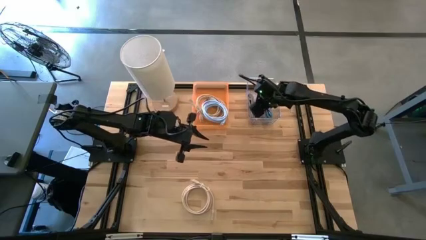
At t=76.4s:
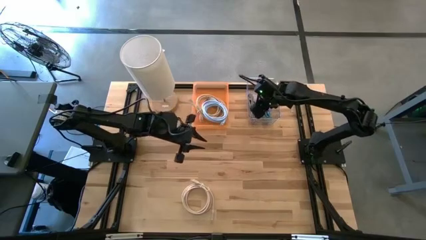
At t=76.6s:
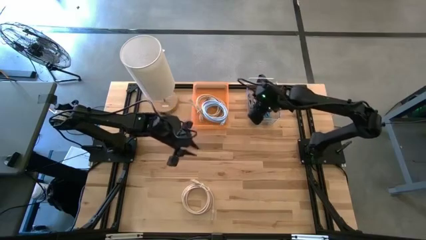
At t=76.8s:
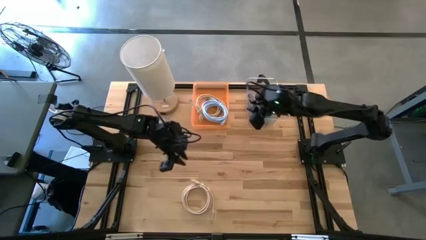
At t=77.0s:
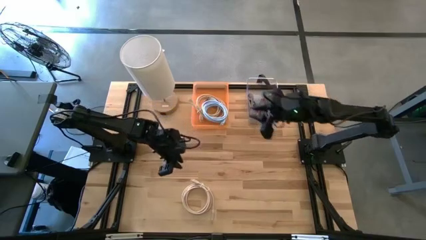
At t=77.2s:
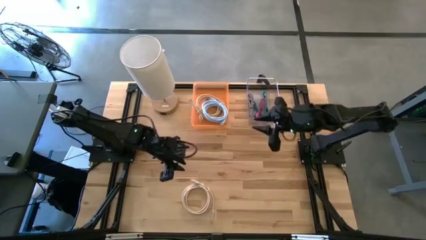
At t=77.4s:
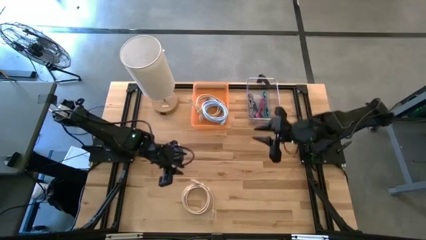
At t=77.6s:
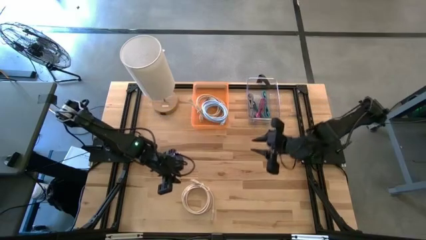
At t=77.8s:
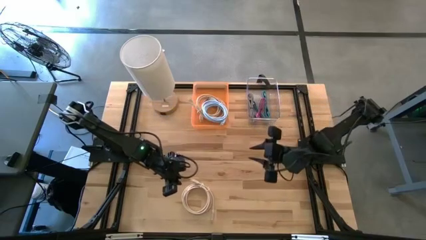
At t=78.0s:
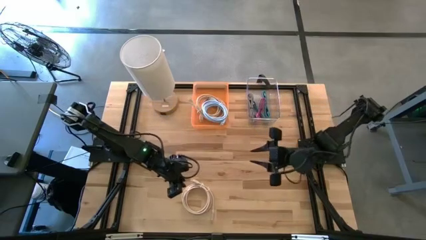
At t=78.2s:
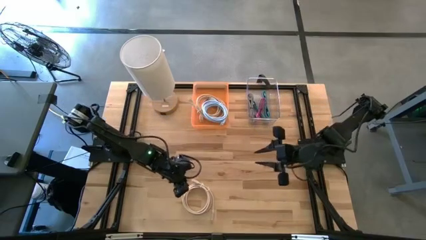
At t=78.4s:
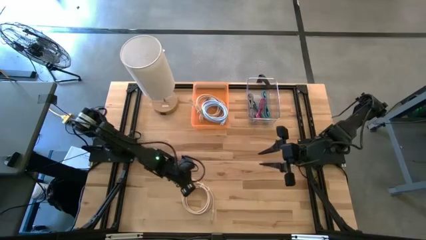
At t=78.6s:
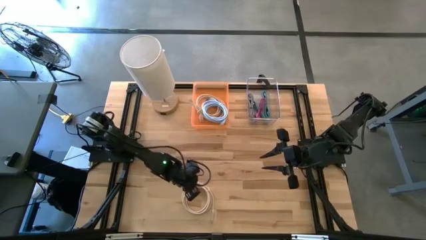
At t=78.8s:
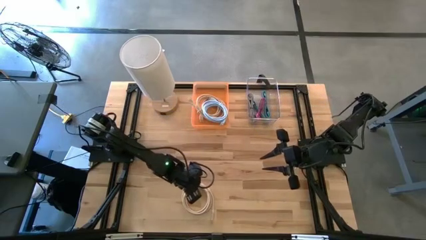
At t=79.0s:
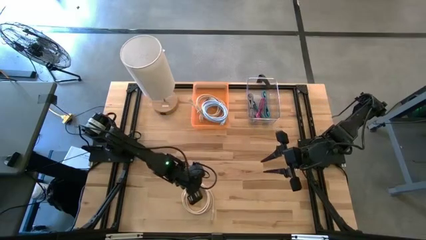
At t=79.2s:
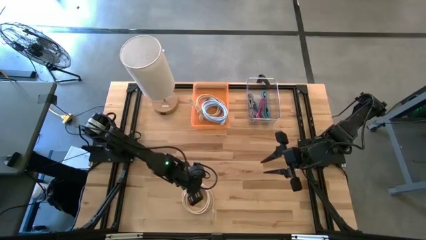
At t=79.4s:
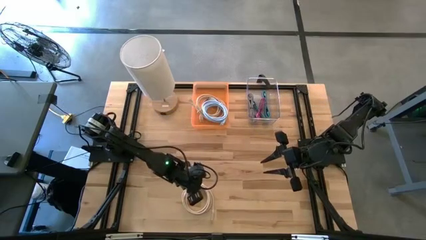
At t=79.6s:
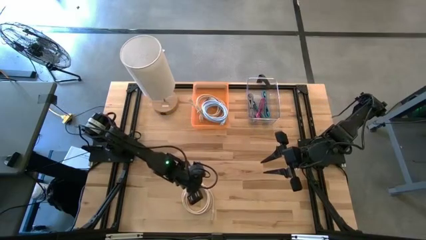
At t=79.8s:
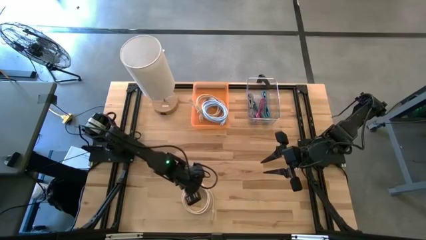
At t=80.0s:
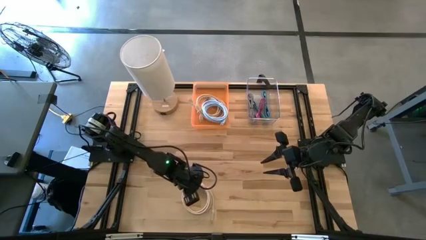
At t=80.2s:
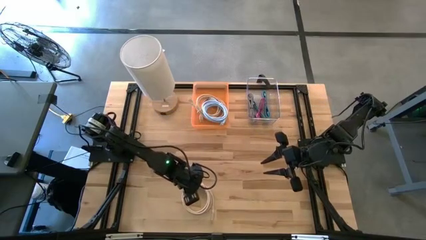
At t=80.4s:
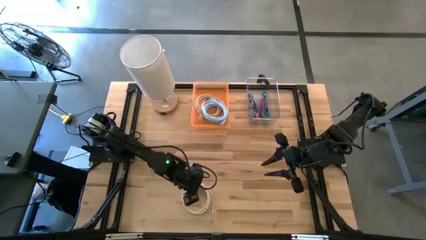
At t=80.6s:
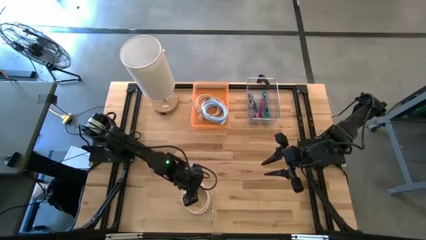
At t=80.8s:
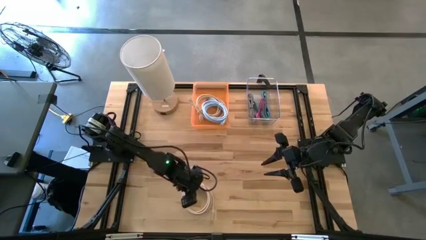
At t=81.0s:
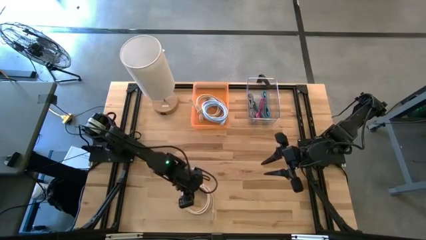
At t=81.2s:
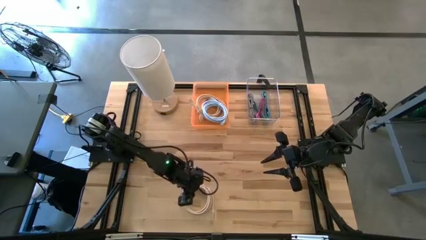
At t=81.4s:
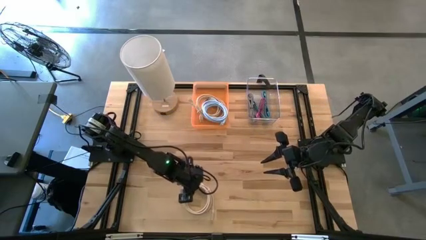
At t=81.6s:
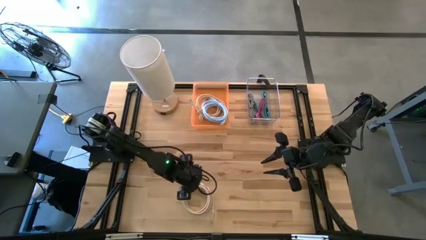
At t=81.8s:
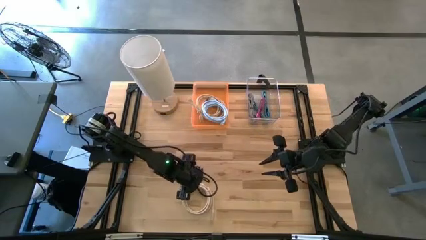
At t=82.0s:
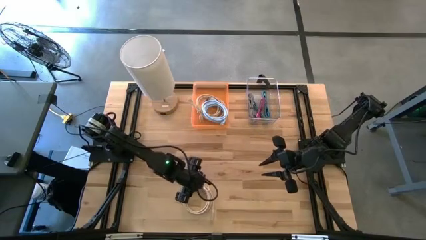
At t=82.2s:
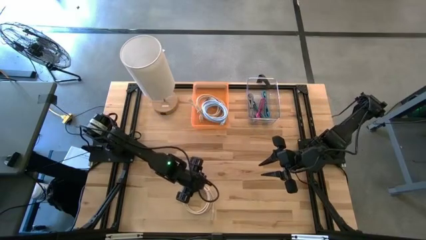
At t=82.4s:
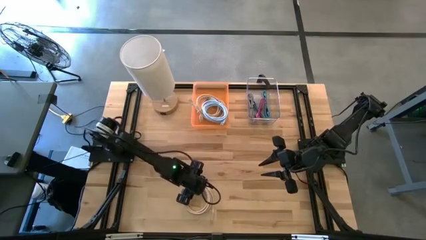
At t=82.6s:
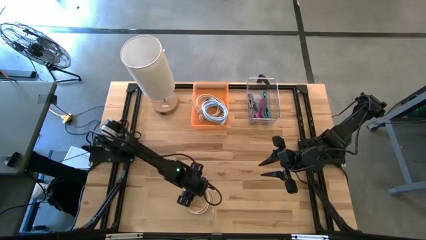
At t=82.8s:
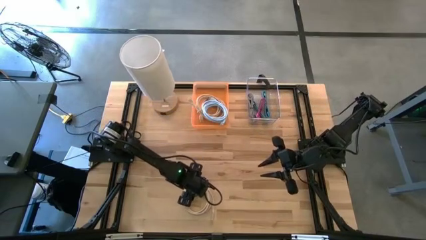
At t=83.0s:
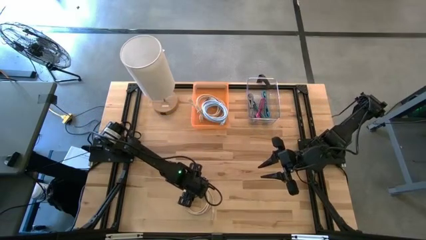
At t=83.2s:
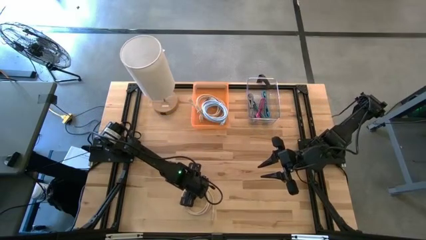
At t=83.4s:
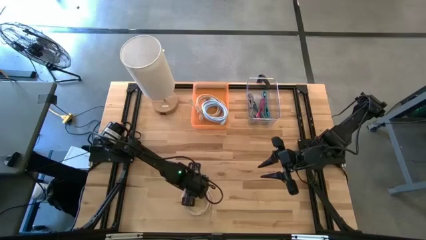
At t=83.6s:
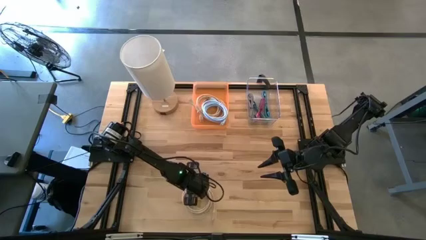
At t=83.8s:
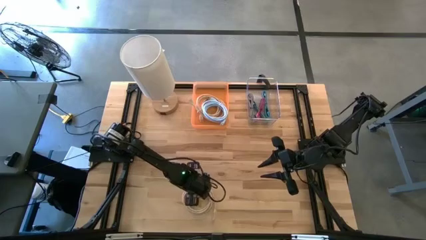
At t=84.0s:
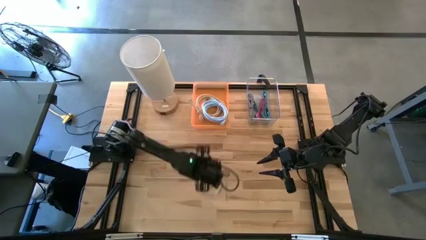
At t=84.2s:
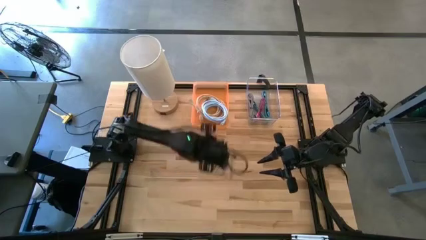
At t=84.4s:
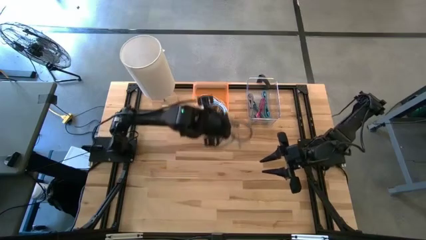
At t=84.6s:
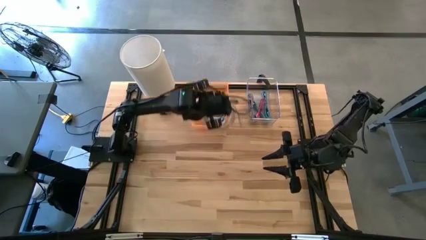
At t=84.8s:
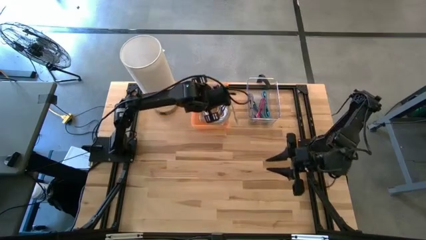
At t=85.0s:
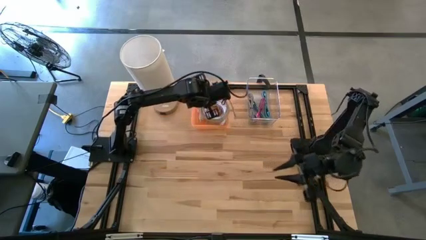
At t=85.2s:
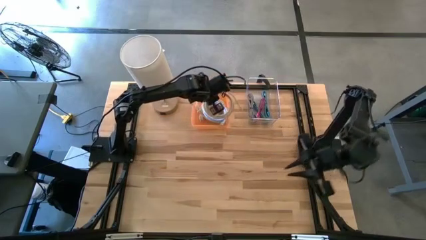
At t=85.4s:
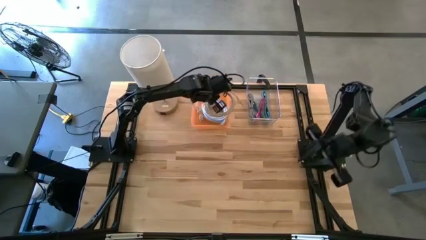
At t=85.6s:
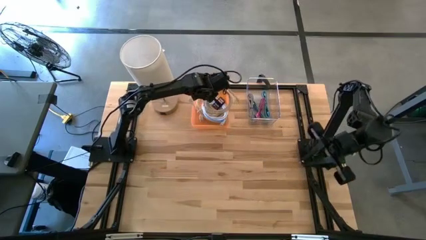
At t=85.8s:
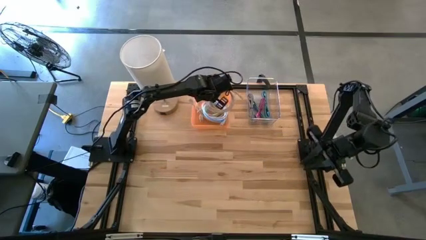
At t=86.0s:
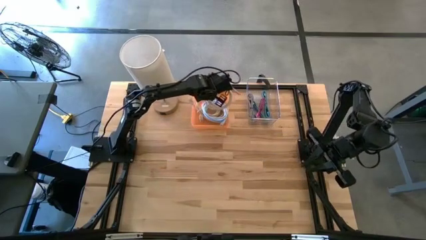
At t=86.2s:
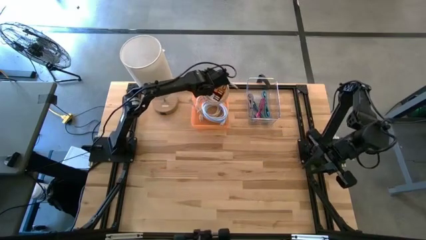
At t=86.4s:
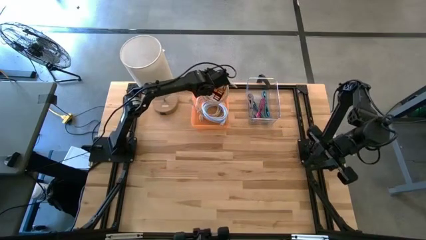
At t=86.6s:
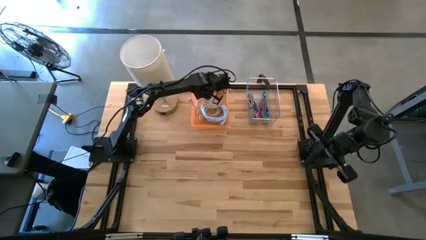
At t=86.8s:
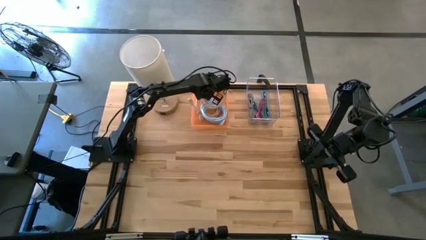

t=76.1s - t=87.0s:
Task: Pick & Place USB Port
Put the light brown HDMI cable into the orange bin

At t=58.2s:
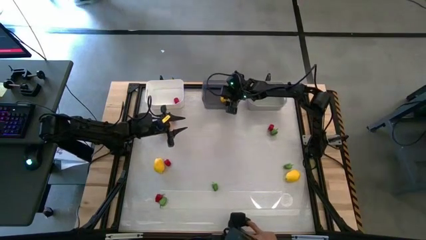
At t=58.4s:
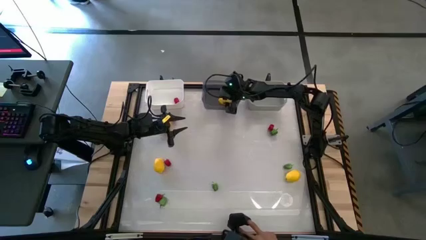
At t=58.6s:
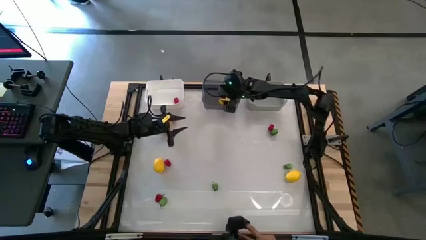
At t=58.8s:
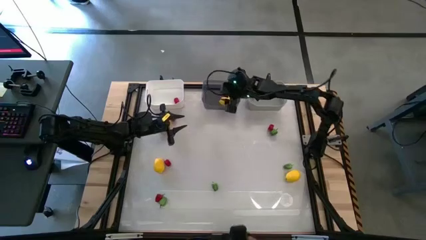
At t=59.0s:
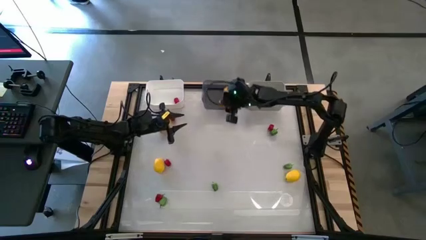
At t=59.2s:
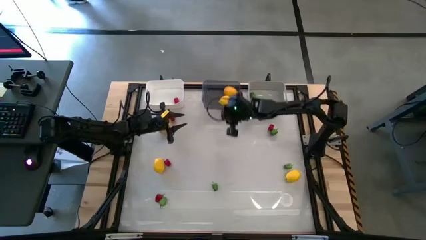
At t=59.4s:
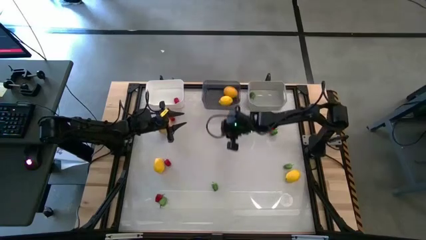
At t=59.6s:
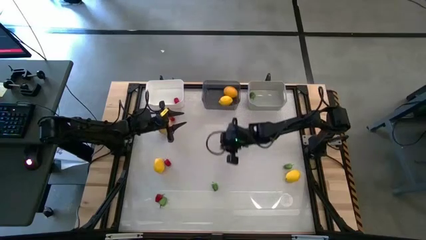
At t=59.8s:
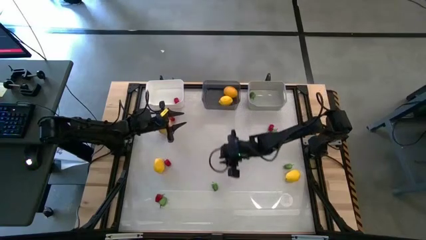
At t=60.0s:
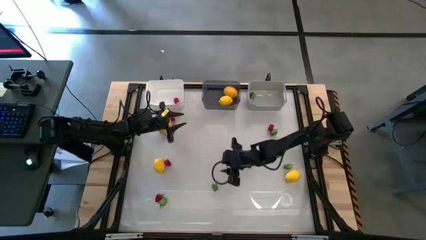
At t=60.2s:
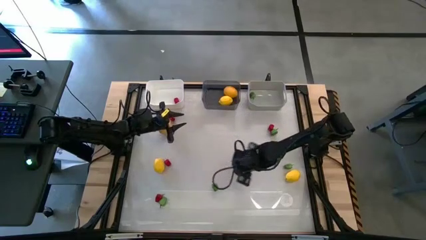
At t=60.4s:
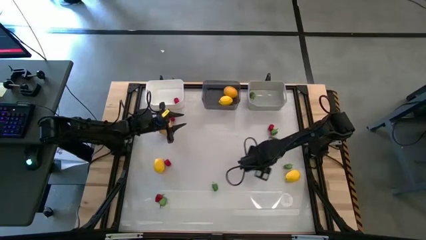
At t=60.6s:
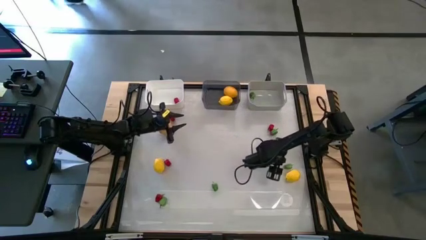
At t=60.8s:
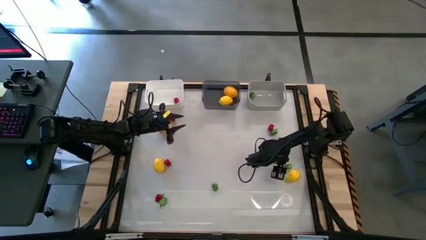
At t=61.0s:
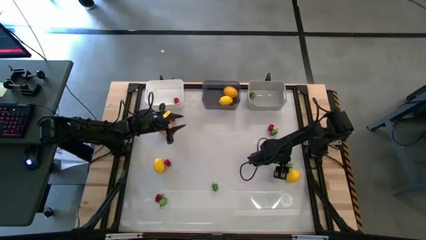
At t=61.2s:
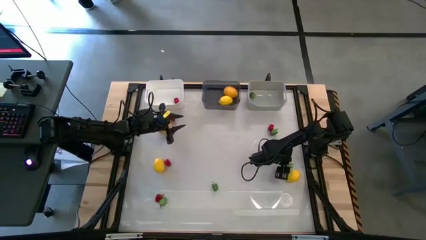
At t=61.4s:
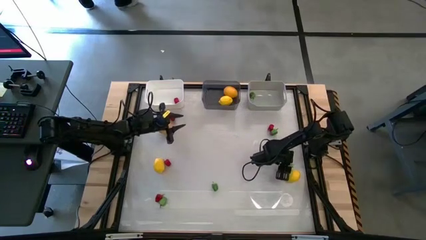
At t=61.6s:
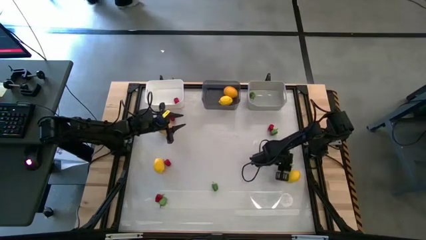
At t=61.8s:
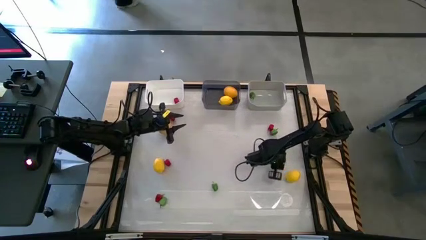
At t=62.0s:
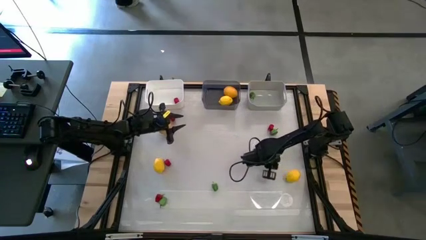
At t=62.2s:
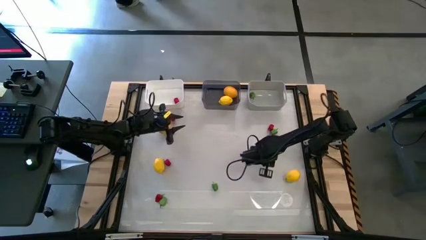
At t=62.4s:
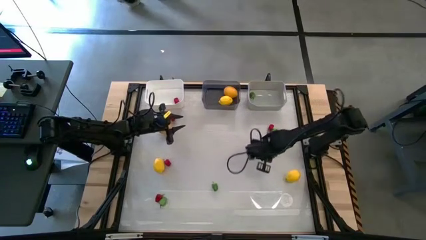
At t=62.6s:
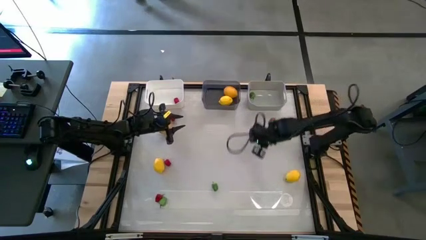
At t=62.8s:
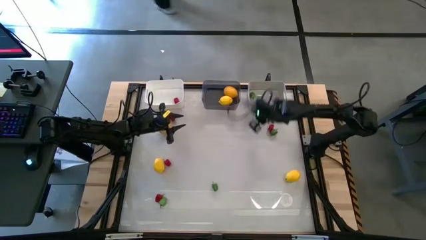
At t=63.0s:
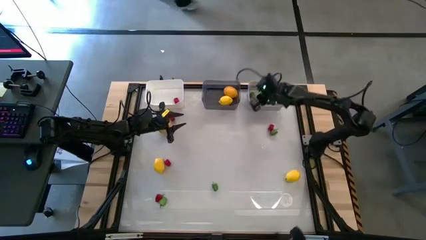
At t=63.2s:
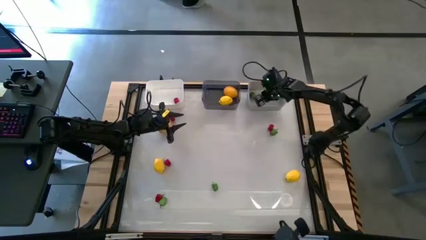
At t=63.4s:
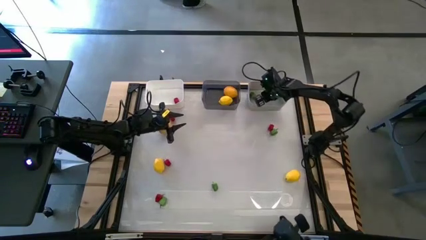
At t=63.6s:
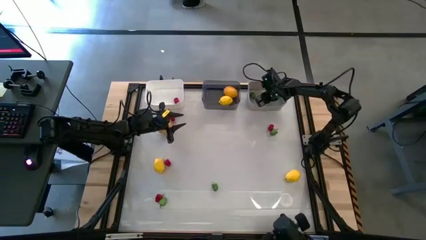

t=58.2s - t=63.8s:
Task: Sort produce into baskets
Put the green bell pepper into the gray bin

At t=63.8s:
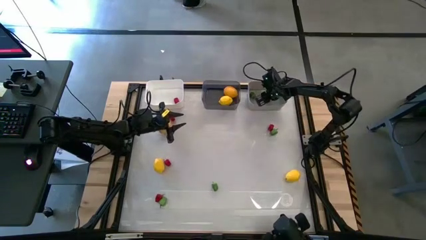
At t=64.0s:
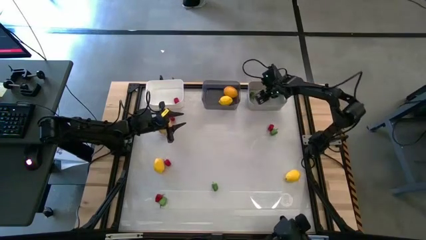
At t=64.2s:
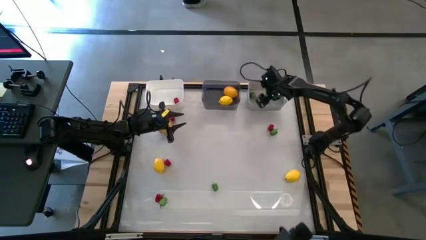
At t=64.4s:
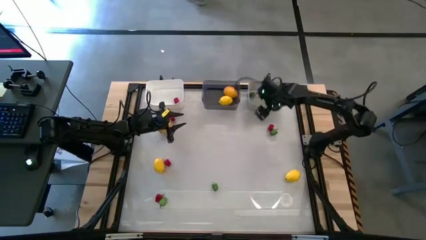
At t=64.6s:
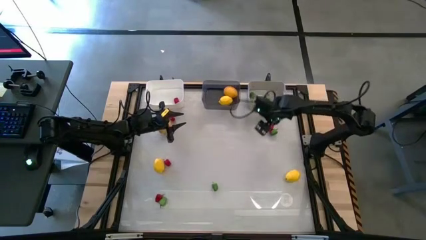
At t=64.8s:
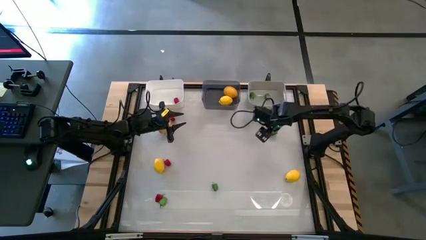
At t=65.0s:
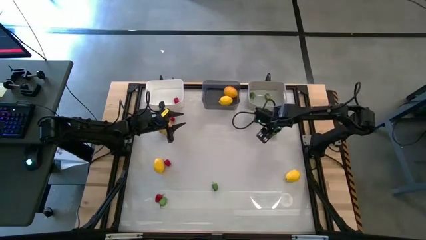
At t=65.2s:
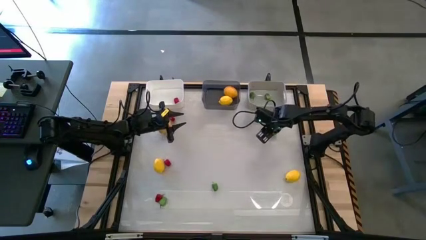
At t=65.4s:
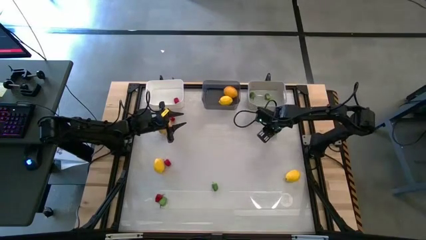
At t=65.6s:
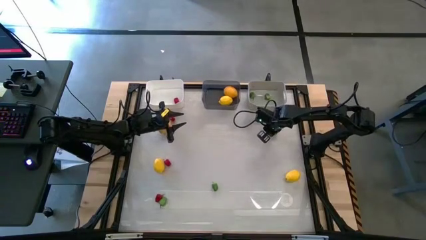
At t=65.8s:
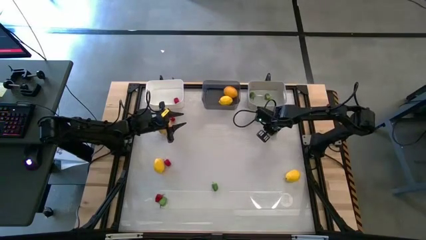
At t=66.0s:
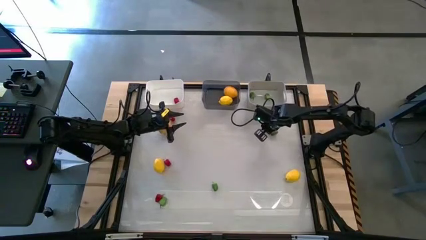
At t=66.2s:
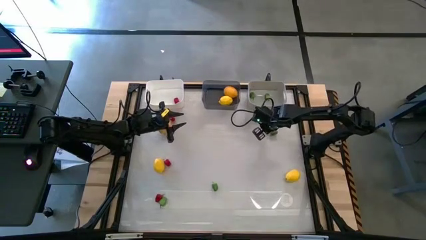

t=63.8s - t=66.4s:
Put the red bell pepper into the white bin
